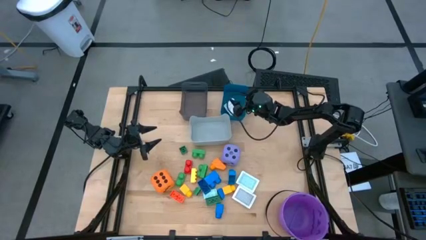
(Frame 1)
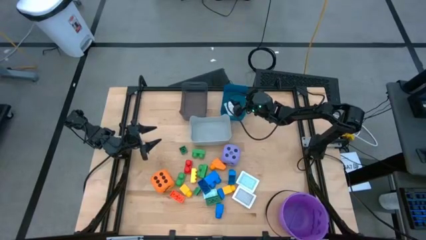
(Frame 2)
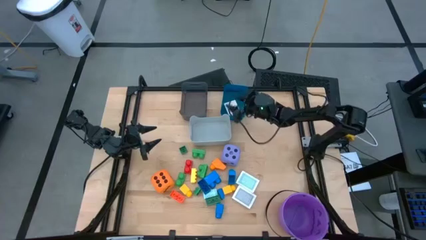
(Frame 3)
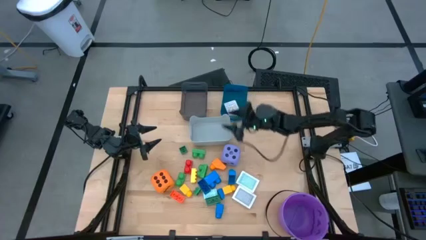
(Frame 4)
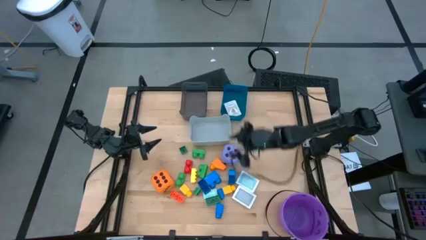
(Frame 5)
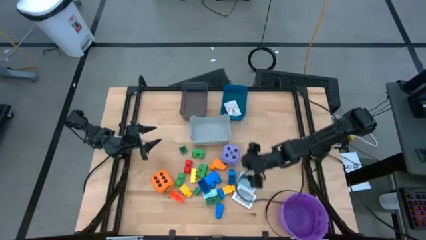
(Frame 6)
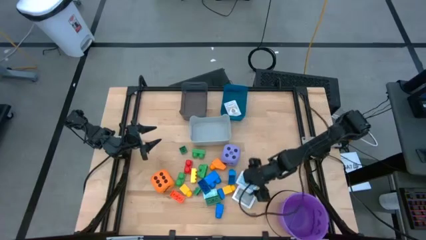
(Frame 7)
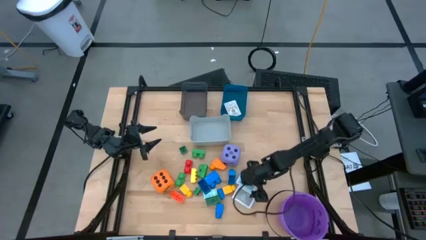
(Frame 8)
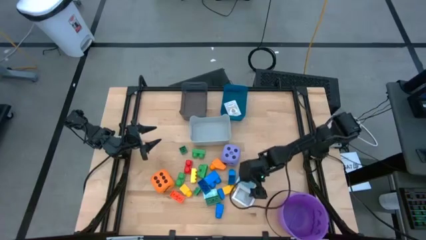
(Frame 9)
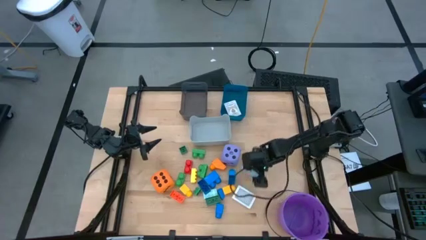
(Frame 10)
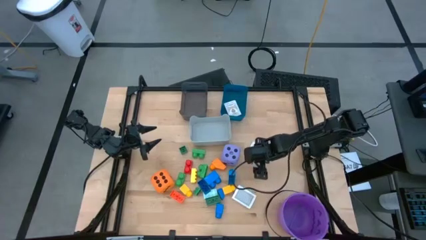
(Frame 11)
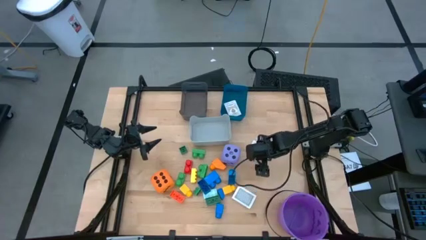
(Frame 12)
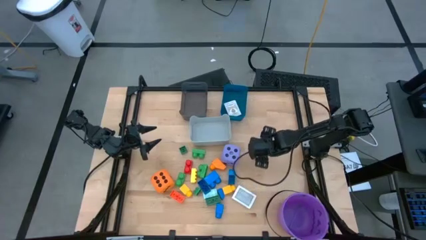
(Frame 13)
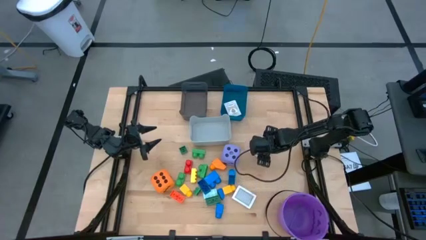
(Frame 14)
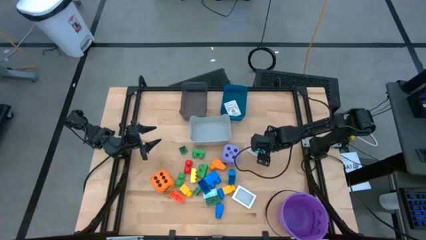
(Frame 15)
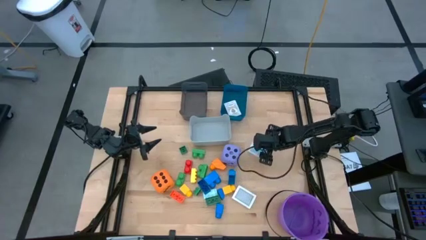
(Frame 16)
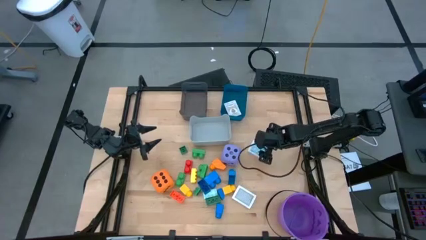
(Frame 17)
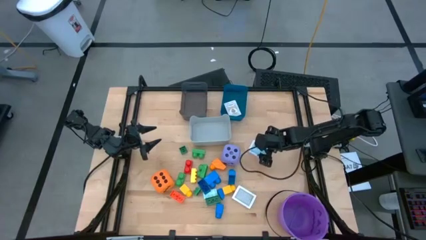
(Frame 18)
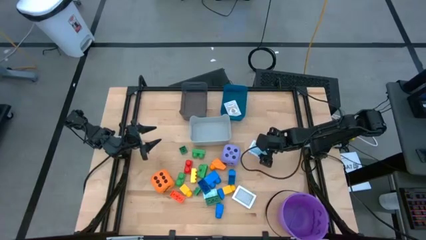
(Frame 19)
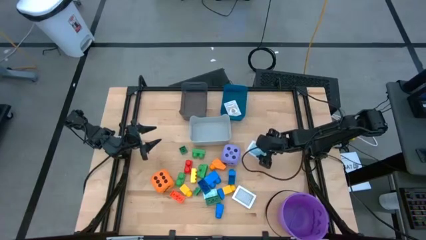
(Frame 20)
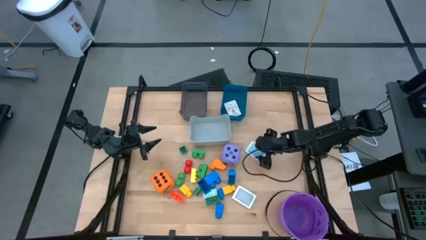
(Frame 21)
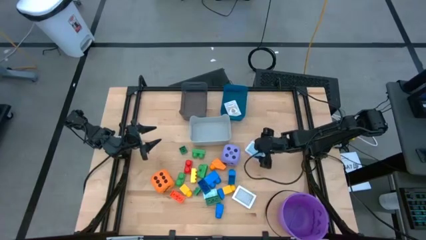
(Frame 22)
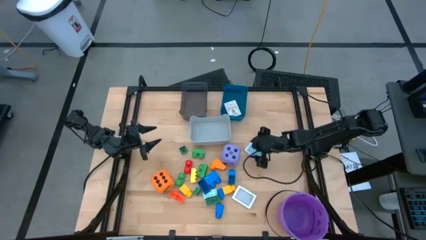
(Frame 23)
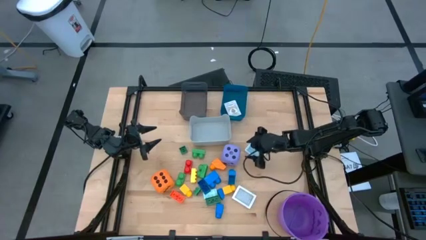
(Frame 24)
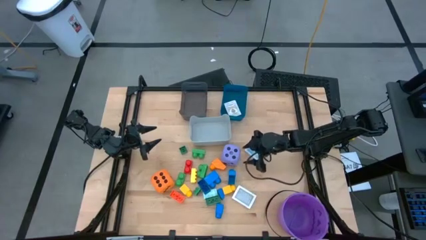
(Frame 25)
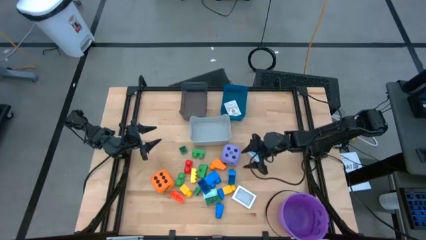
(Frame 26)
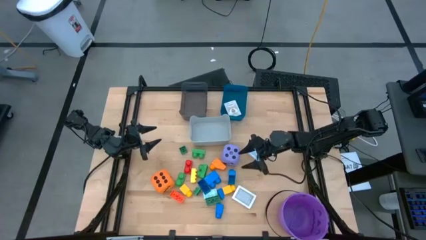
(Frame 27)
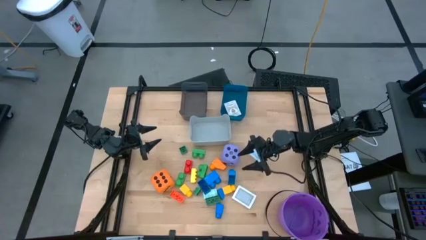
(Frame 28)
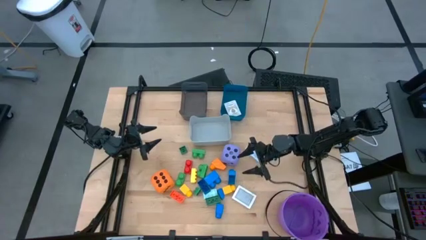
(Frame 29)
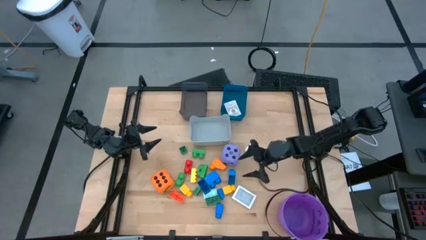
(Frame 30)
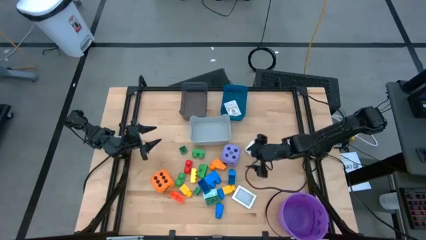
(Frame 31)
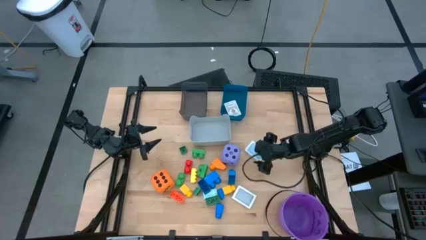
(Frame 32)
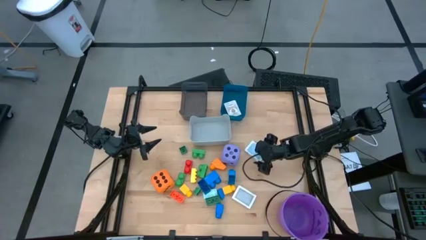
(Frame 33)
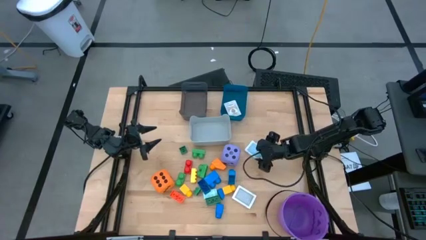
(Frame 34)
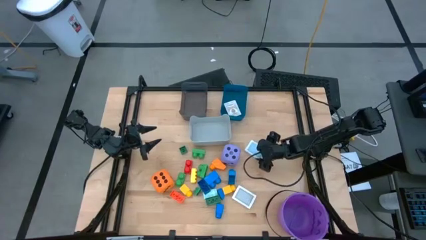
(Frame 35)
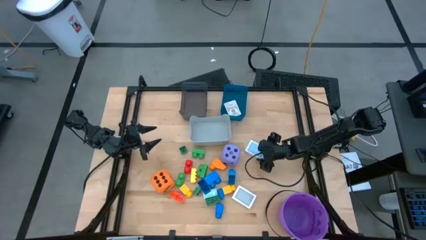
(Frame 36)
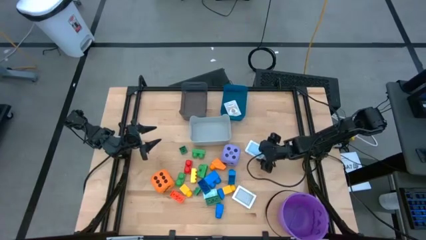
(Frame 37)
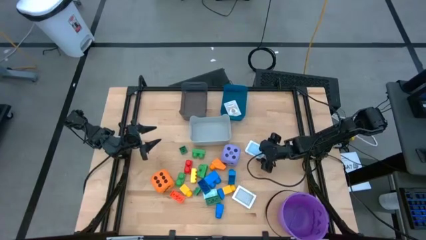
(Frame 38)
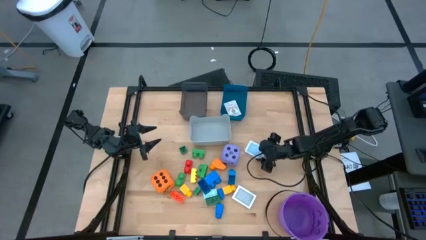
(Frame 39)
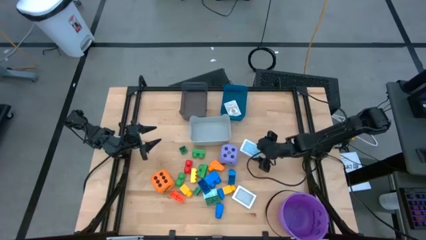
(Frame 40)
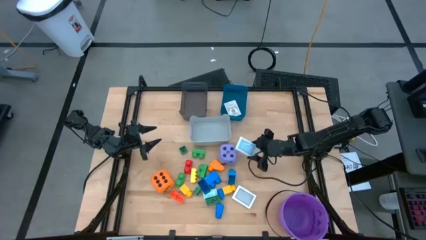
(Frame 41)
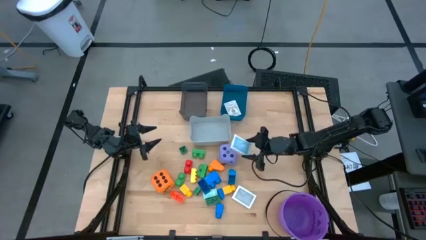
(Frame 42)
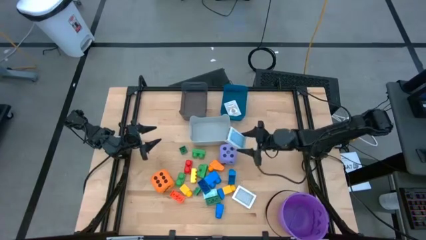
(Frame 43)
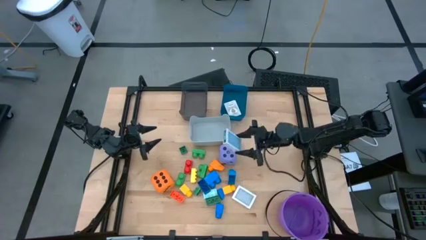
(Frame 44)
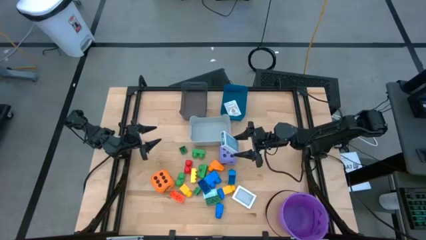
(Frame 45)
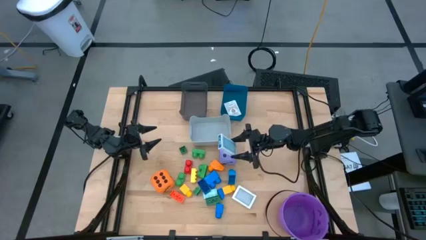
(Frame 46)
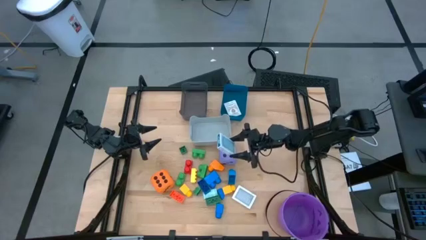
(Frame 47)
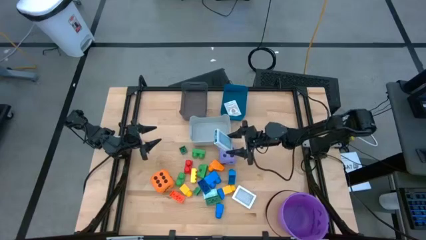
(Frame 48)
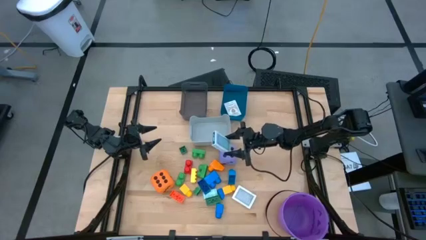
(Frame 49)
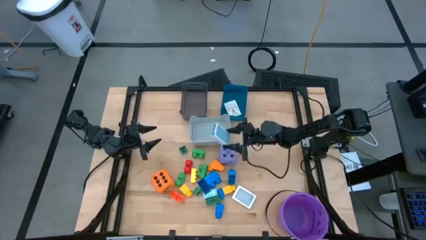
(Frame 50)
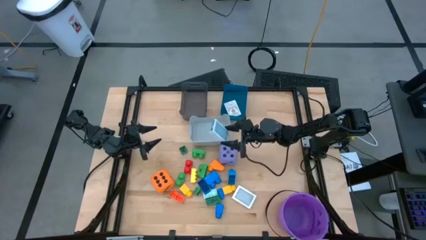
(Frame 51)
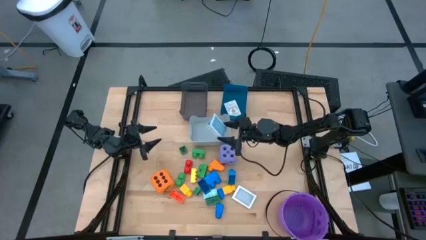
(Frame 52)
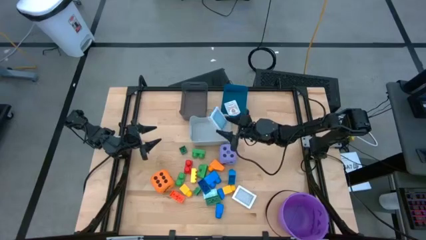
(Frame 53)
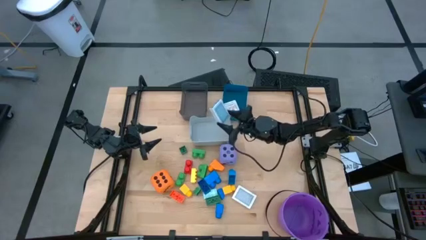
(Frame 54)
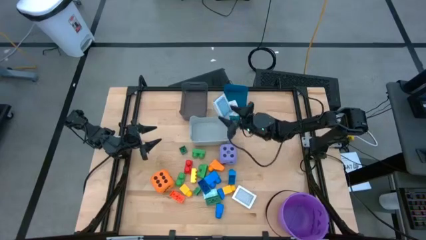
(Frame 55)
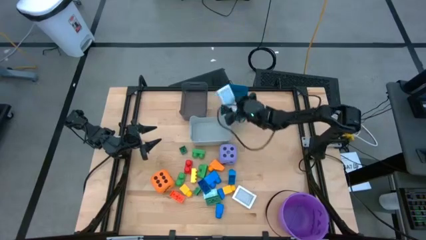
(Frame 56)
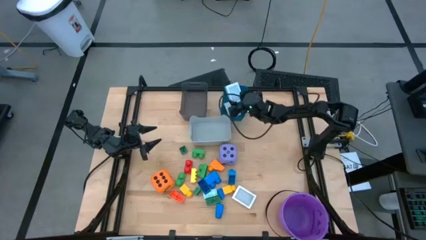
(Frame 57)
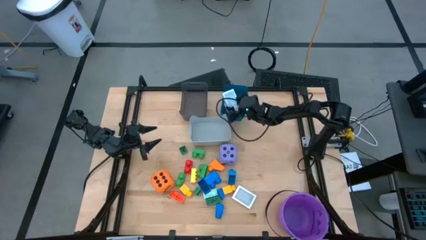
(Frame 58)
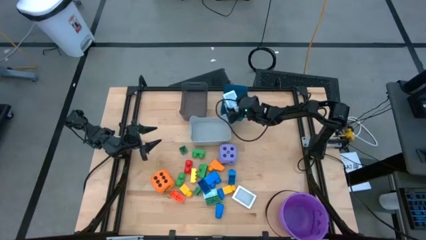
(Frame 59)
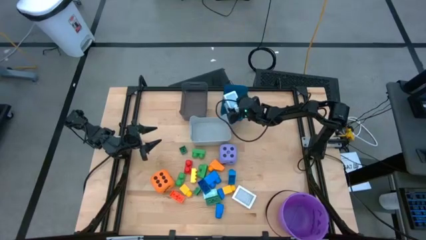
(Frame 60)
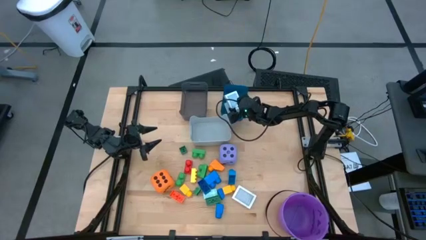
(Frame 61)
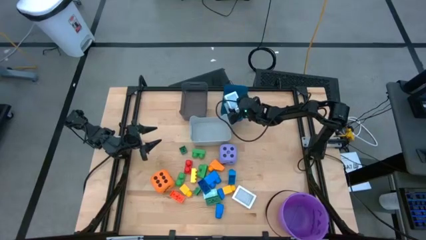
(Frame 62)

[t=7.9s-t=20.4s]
Task: Pick & Place Toys
Put the blue deck of cards into the blue bin
